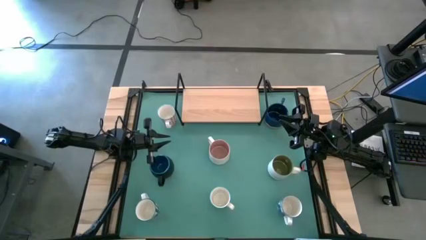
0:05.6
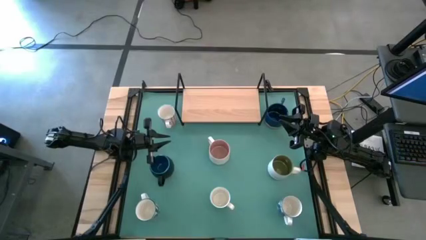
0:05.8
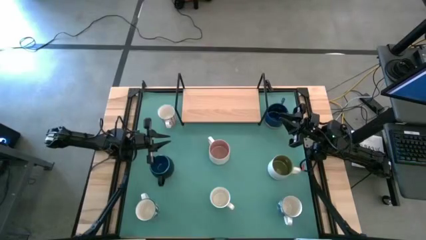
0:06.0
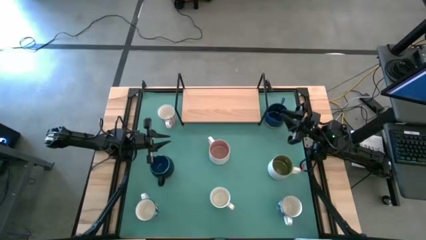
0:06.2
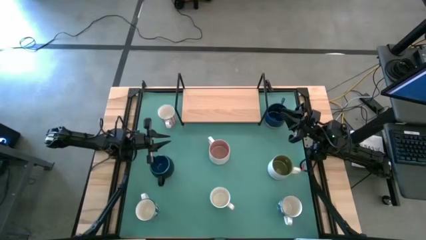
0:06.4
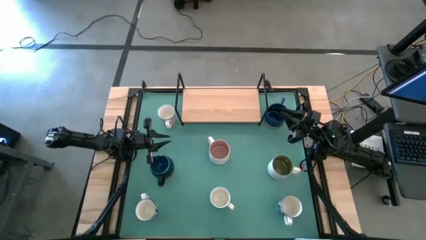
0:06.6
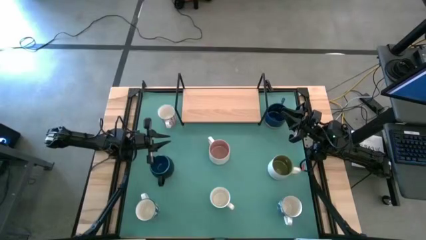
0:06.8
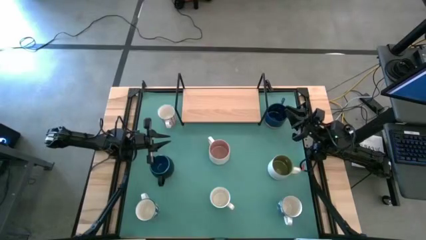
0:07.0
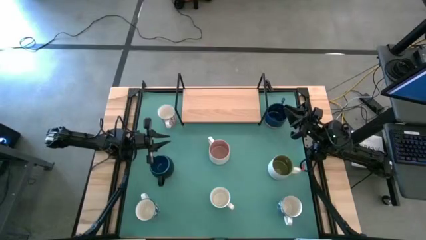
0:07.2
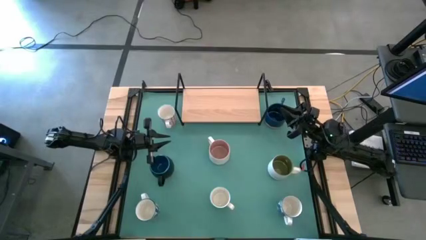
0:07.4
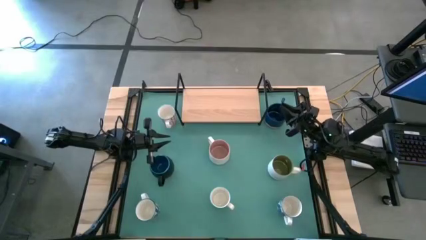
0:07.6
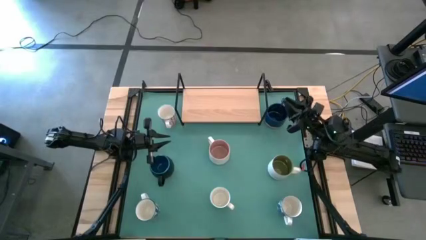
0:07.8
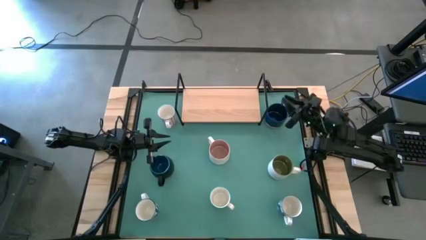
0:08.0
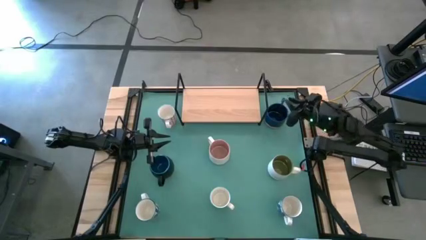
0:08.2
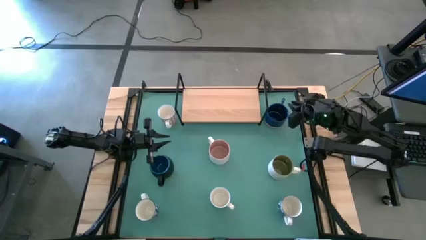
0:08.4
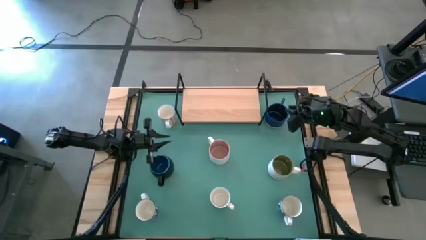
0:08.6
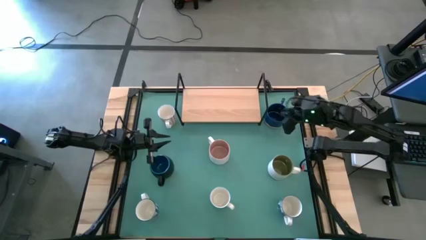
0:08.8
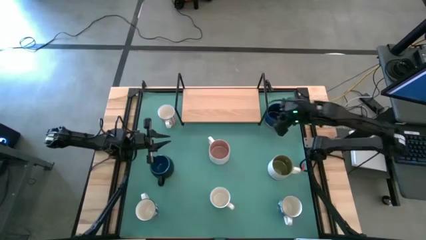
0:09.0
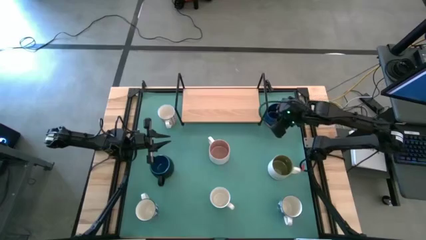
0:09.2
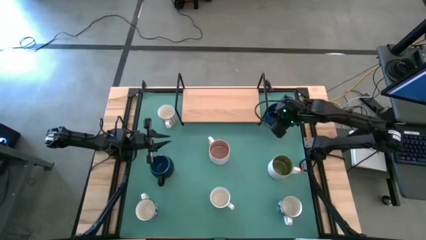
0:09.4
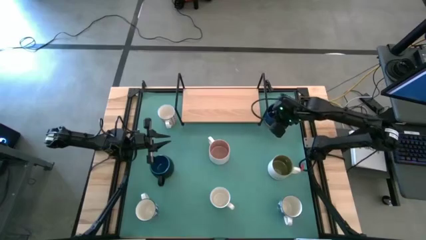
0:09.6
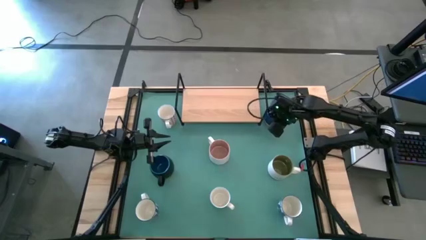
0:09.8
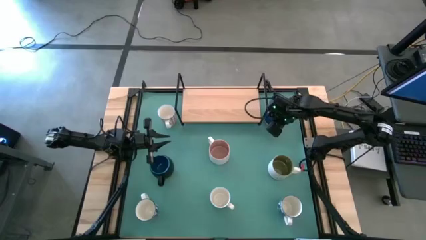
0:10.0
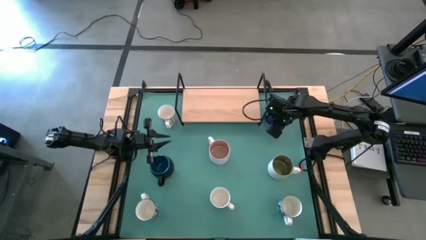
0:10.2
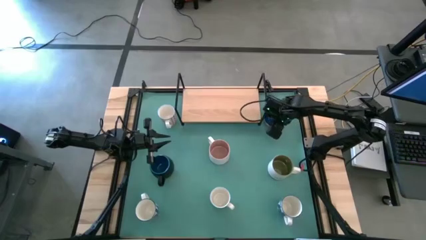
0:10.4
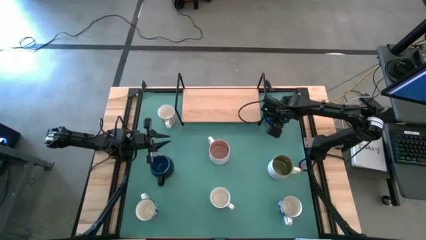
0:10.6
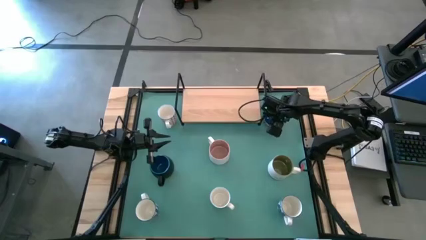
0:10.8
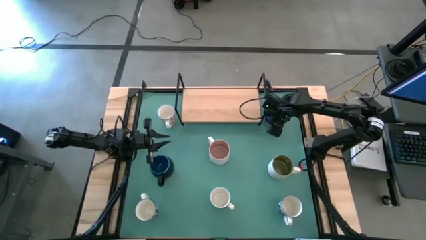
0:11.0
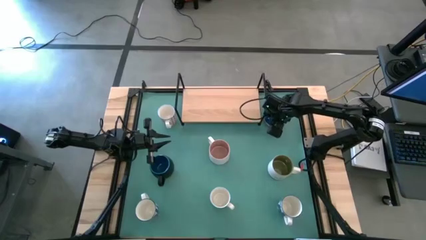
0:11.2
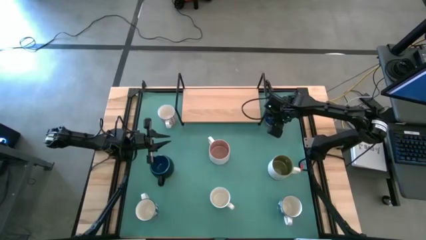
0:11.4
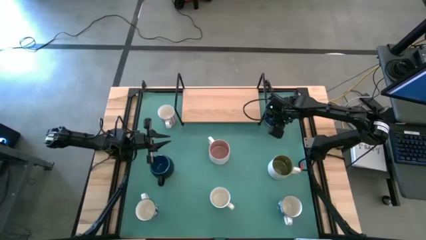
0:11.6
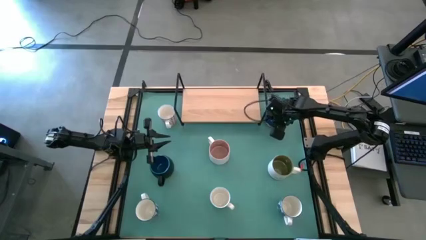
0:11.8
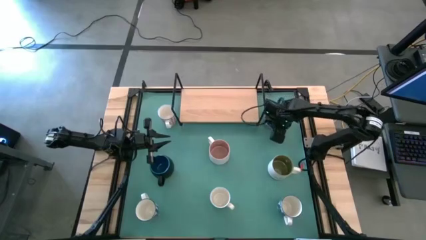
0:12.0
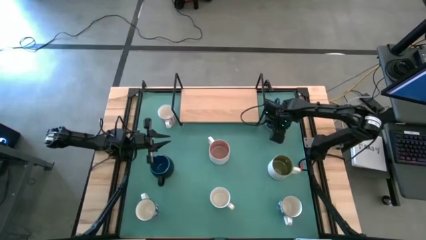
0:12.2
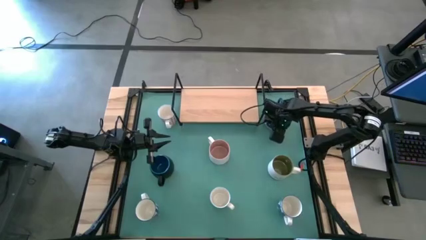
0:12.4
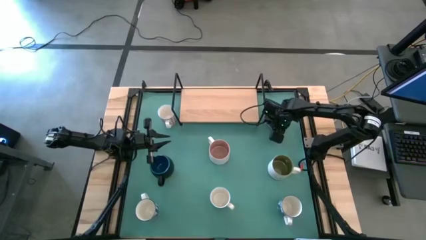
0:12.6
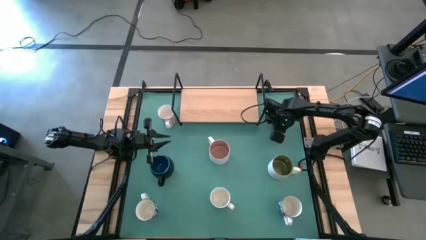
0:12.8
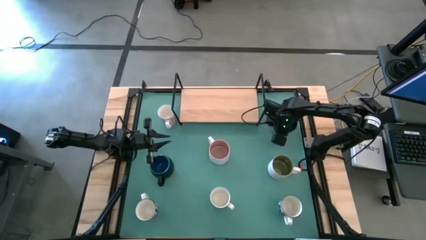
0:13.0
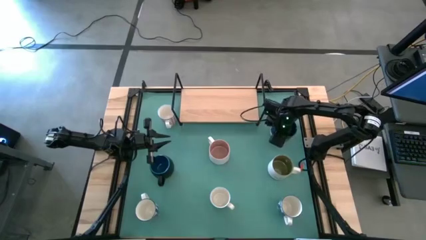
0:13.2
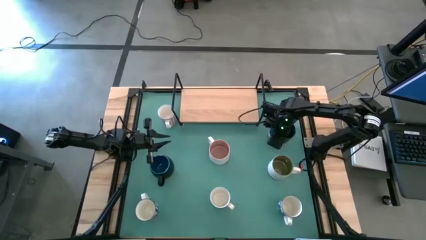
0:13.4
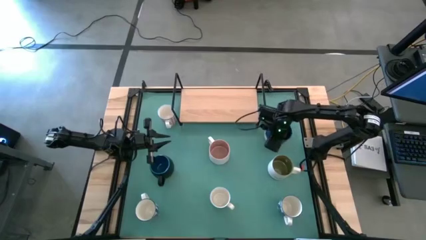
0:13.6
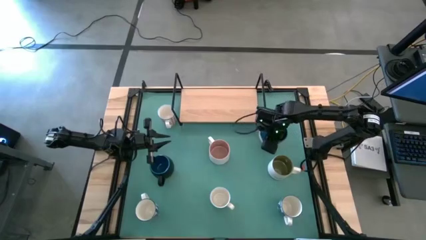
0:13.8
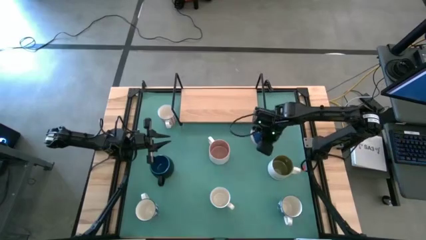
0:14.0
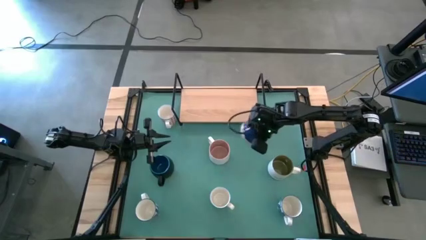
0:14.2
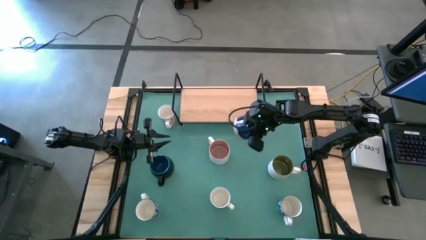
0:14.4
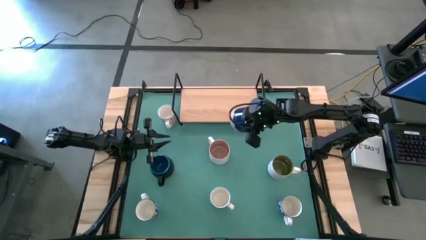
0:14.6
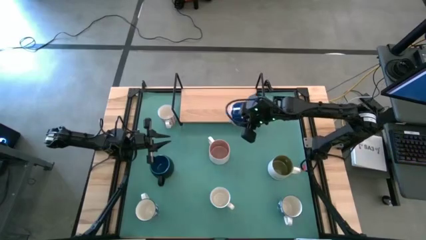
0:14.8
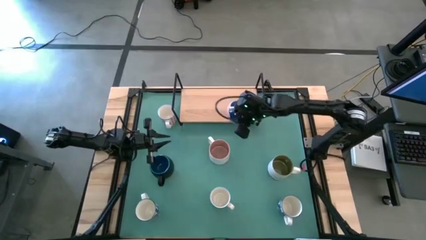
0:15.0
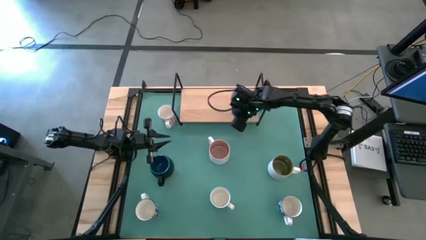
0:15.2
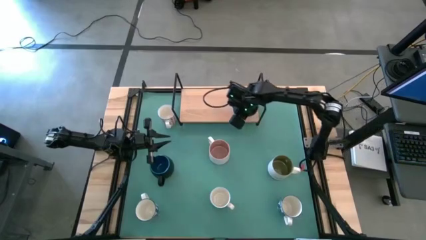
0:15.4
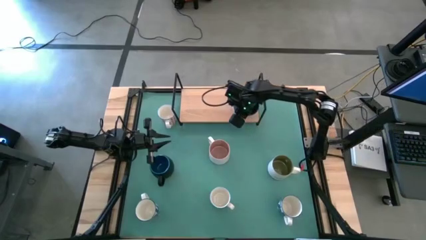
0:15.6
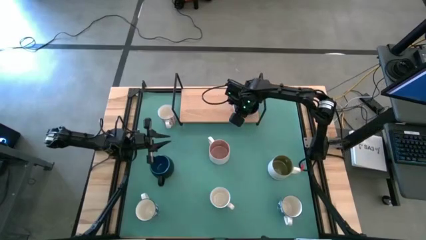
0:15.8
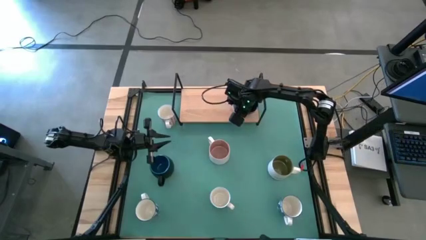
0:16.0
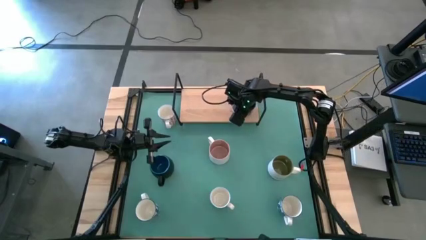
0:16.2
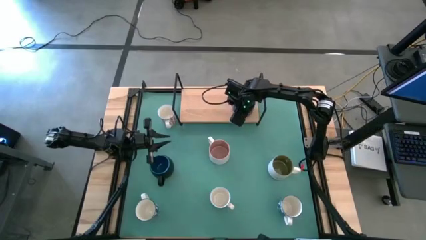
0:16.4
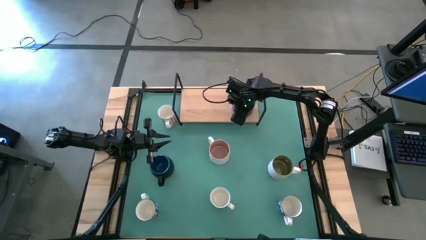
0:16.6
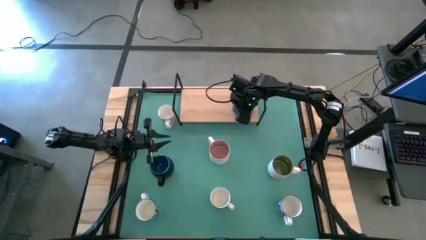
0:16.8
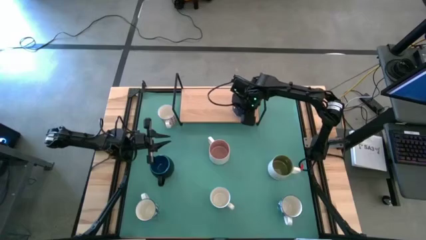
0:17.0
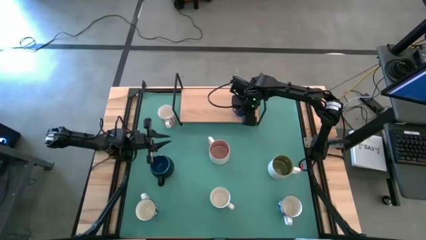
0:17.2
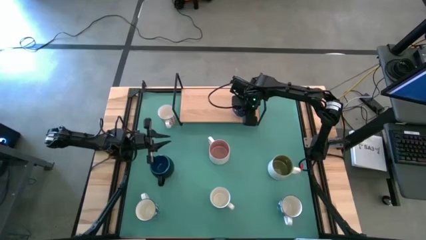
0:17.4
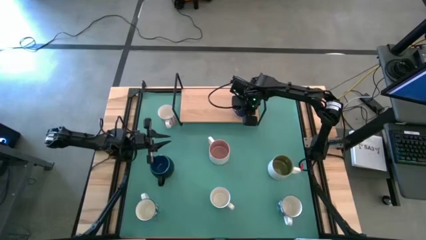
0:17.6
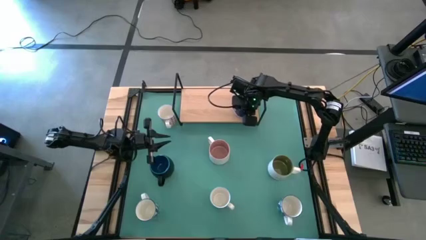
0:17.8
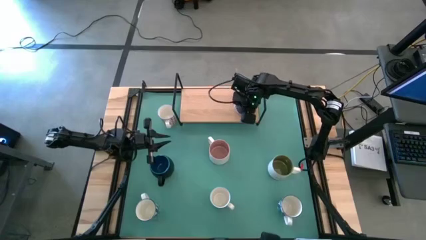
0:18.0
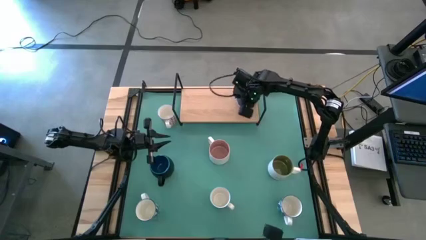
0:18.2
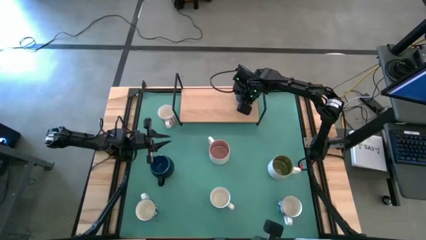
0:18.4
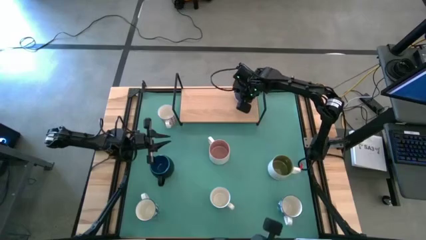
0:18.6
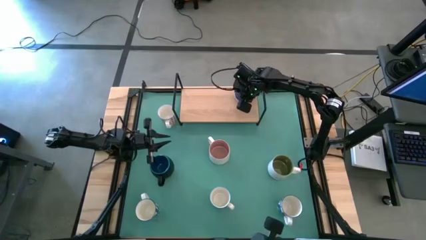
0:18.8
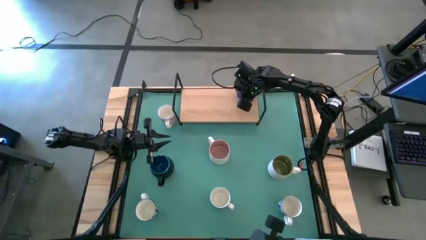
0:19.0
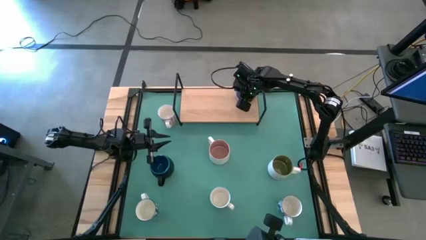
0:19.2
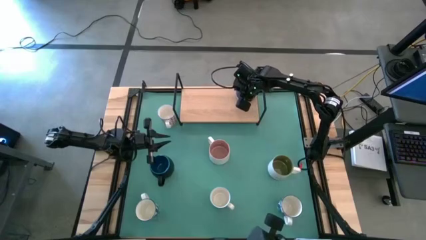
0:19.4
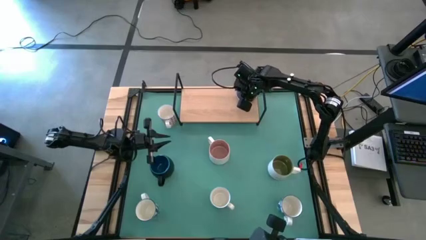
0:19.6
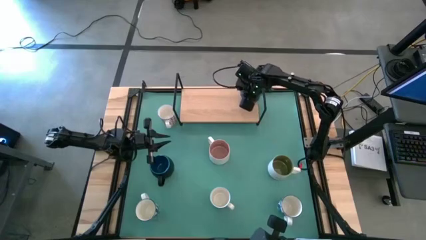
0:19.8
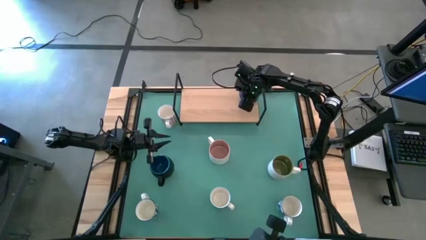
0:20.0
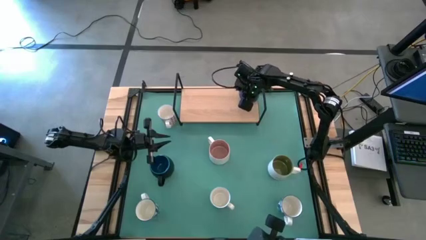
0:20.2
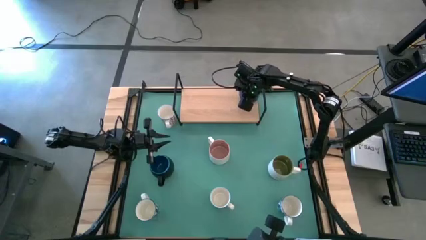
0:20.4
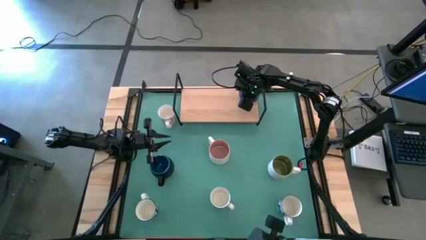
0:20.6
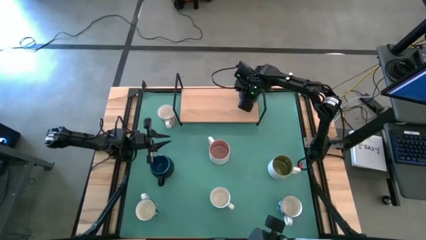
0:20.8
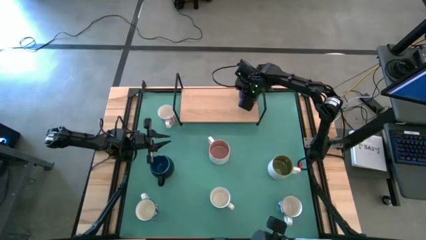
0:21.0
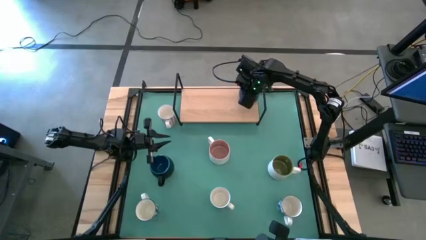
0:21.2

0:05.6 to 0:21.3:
Task: Place coffee mugs
Put the blue mug on the shelf
